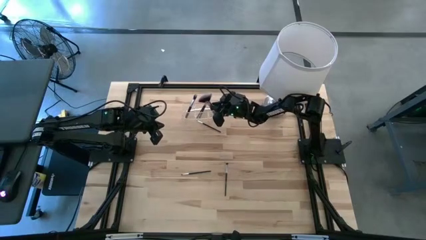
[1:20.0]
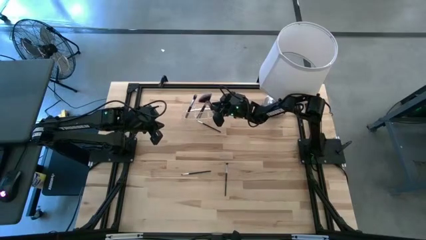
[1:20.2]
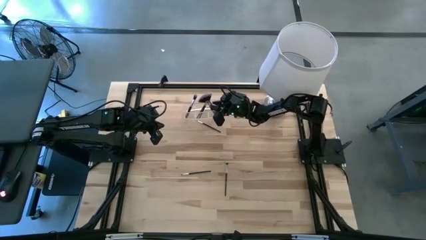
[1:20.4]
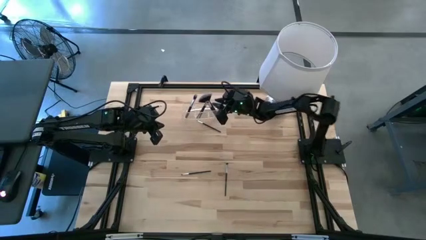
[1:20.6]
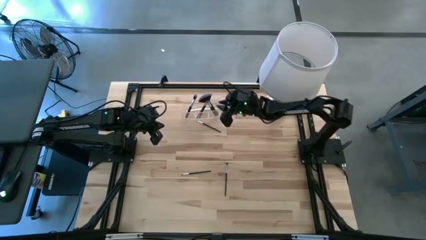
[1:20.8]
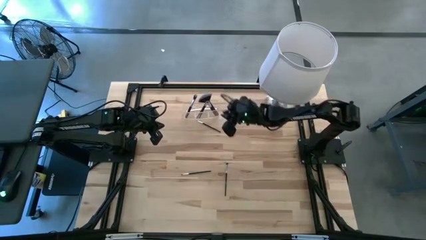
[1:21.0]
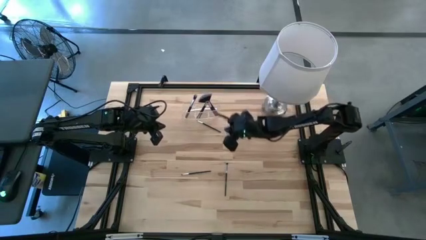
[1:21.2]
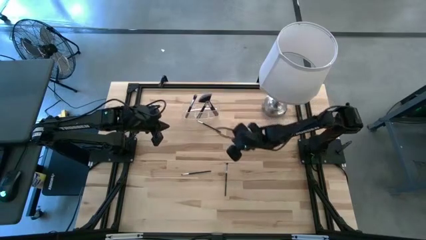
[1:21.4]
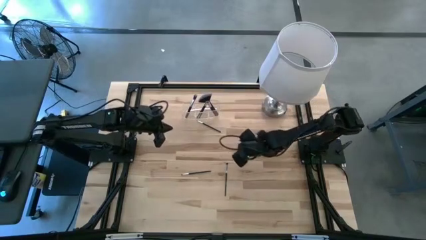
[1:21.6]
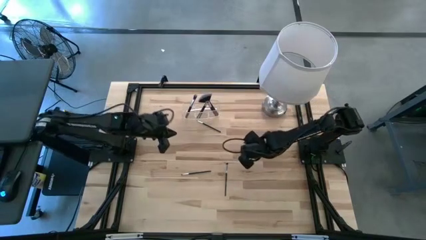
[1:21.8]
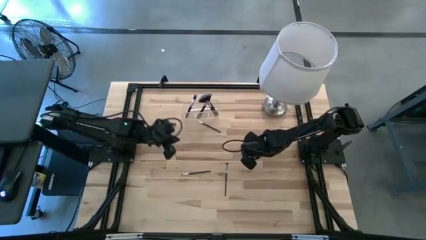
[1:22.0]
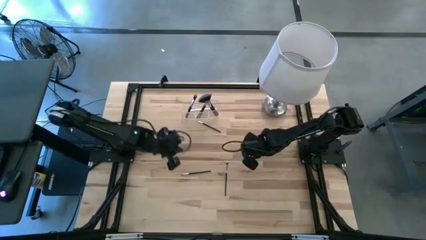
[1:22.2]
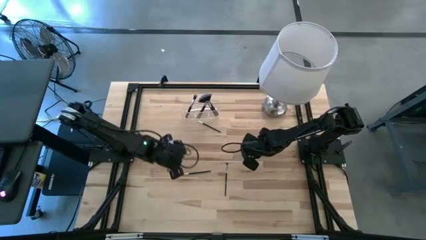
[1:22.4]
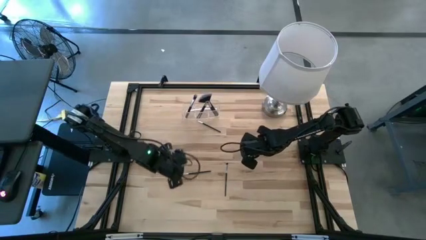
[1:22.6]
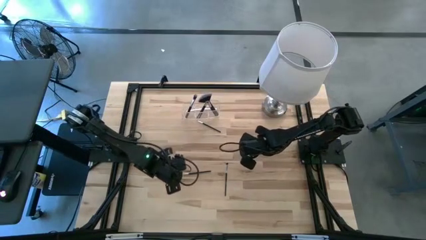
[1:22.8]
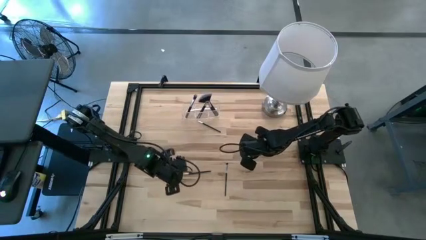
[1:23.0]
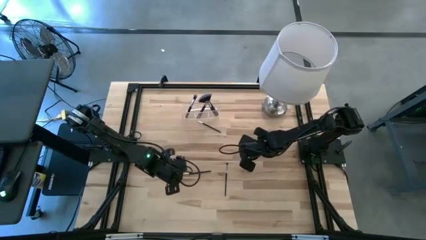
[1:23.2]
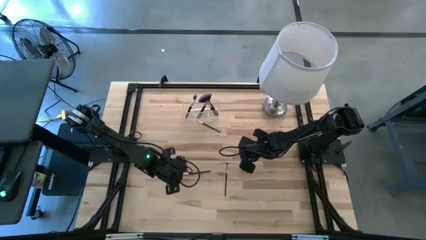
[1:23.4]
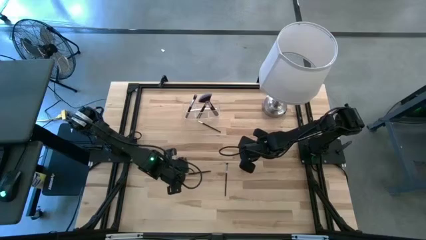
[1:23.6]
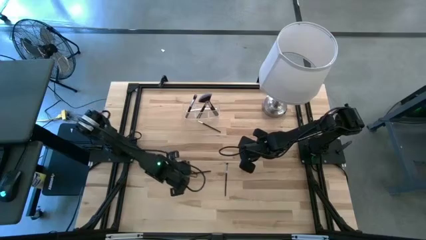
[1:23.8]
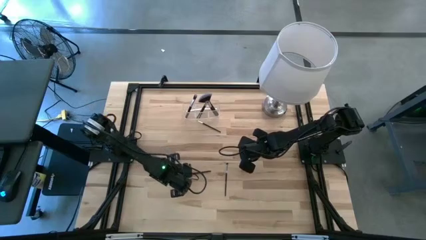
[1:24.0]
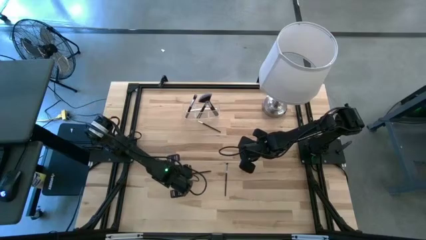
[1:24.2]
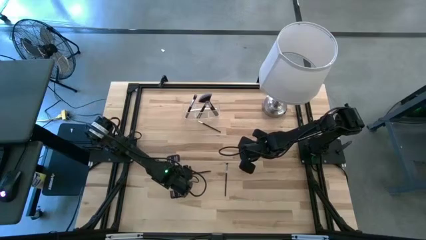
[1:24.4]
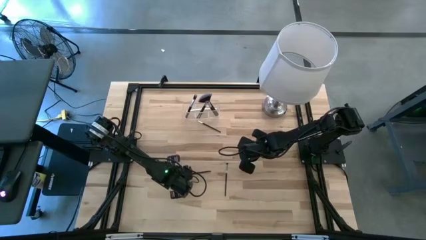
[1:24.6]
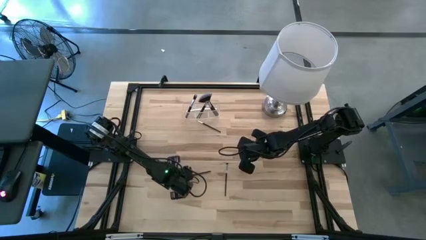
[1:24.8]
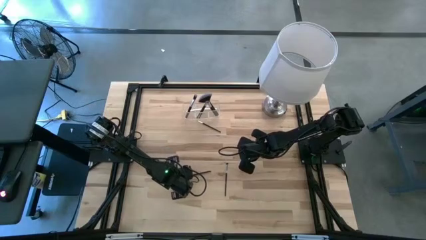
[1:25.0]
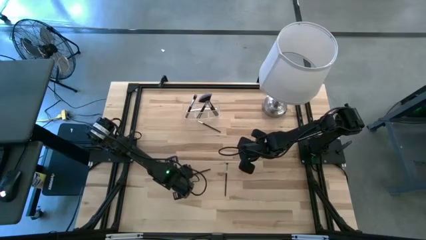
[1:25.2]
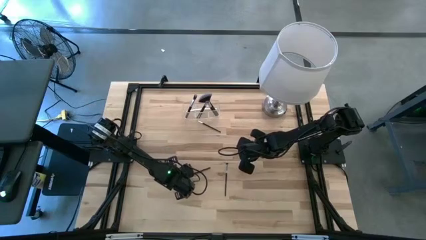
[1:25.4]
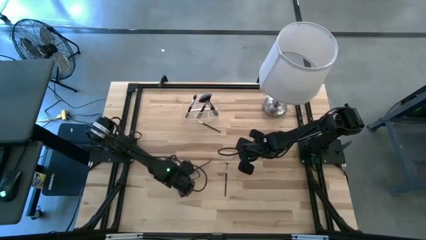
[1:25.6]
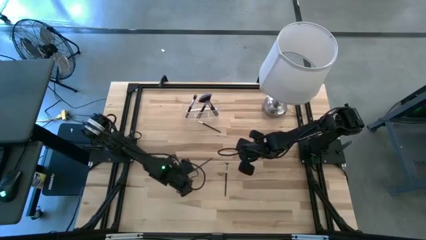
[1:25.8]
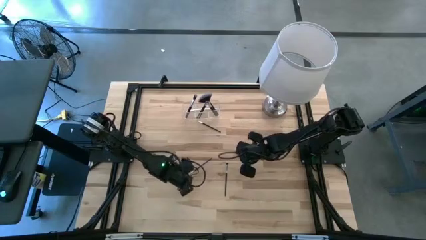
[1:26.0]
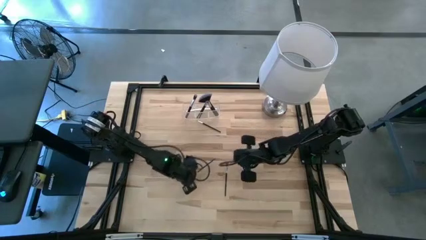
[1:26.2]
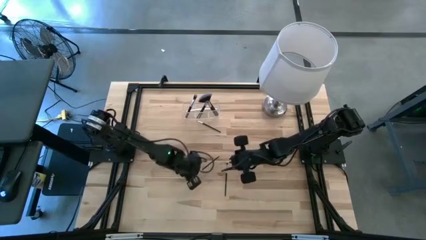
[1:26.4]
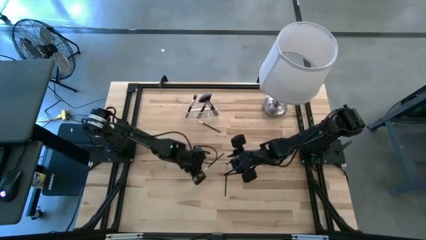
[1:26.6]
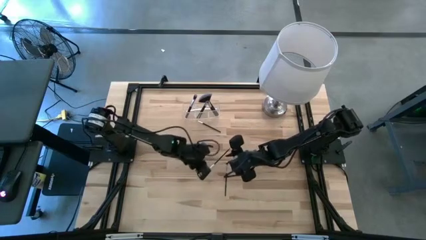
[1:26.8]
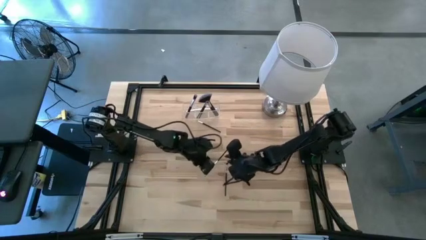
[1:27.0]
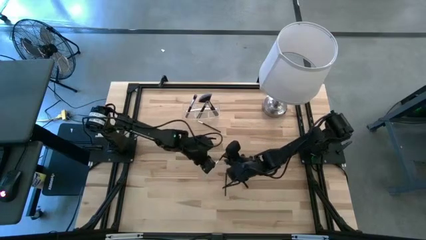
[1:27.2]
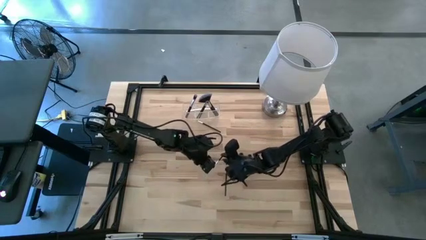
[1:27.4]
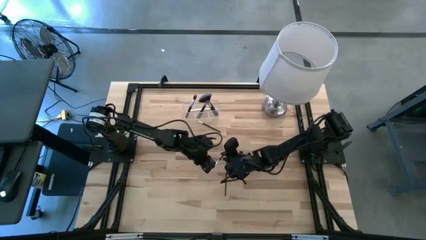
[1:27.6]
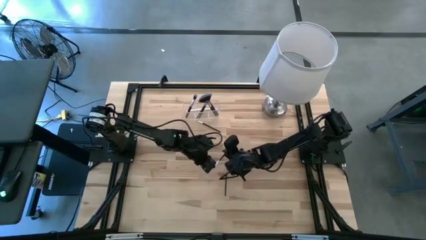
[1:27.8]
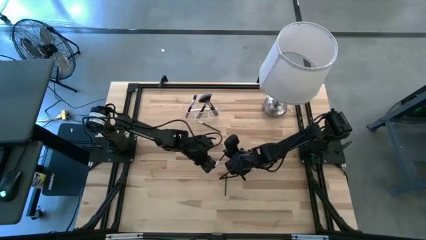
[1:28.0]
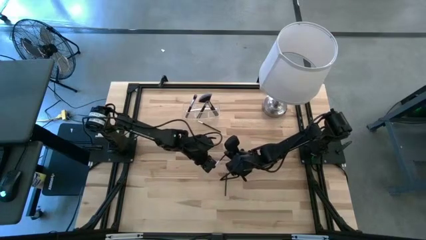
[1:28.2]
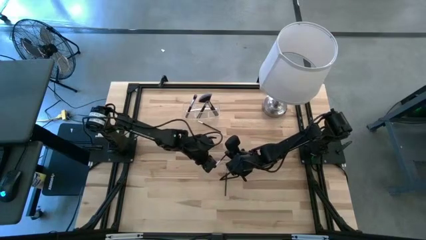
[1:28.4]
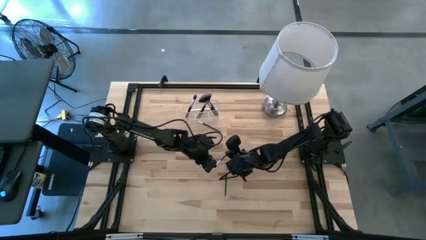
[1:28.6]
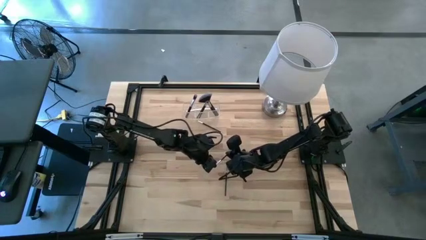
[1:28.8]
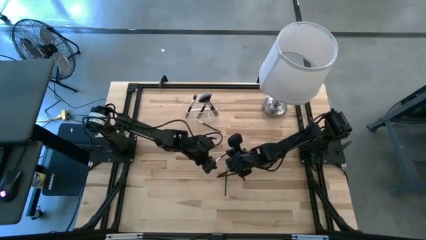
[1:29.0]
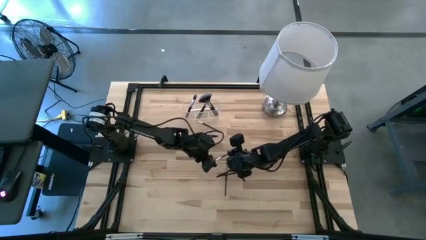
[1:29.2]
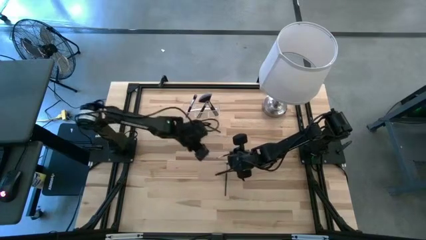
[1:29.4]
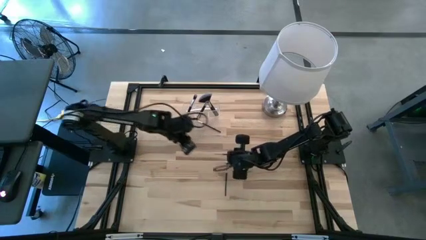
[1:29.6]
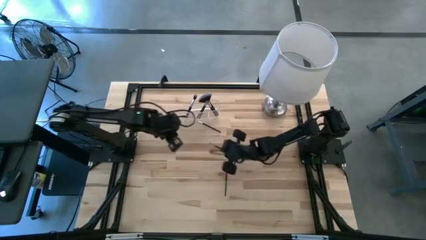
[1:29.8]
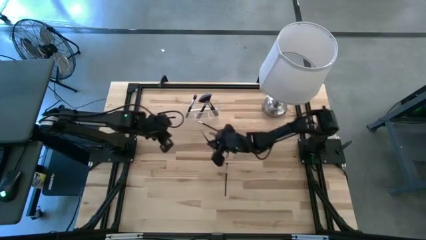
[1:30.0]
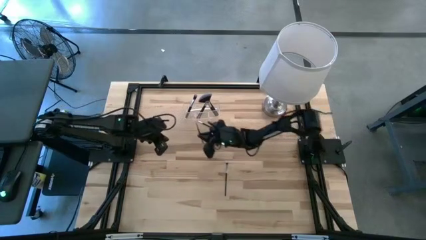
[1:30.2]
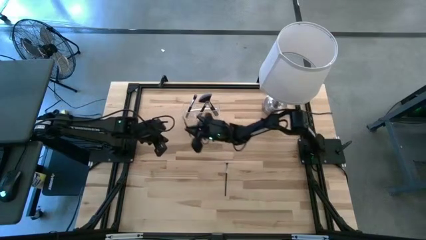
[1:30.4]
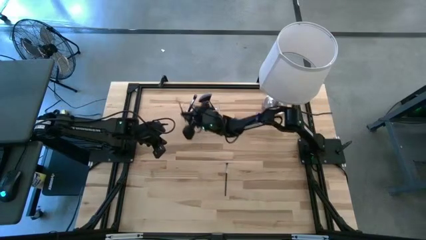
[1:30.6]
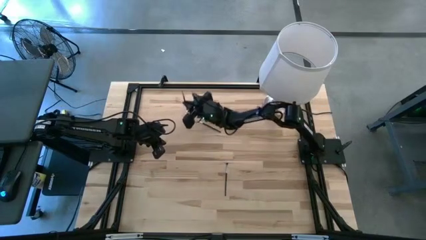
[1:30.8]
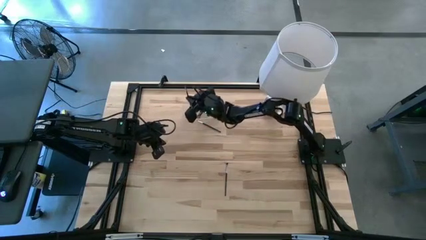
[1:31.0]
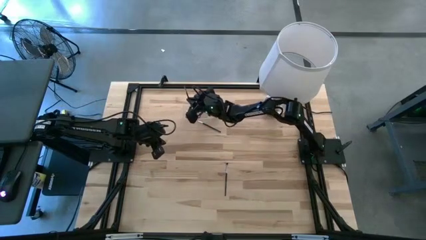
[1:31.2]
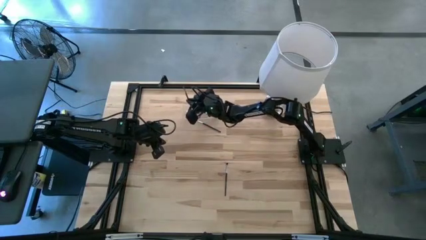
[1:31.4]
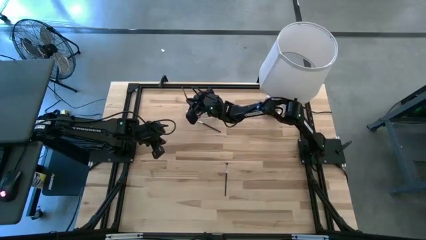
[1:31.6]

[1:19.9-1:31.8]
Task: Put items in baskets/containers
Put the foundation brush into the transparent organizer

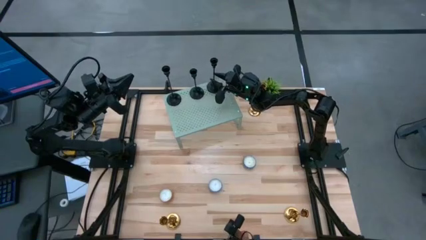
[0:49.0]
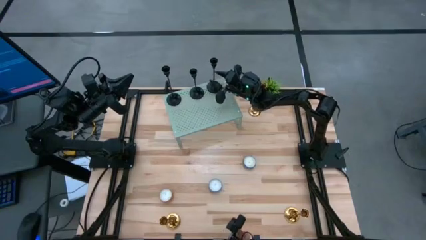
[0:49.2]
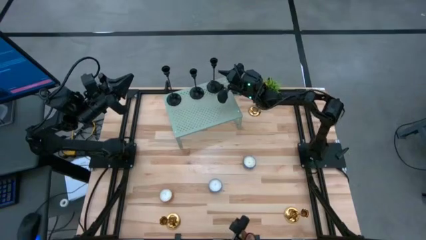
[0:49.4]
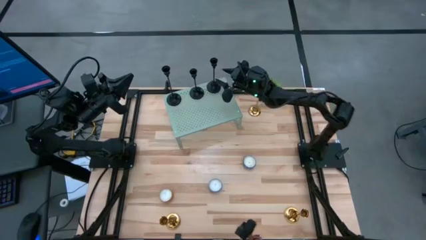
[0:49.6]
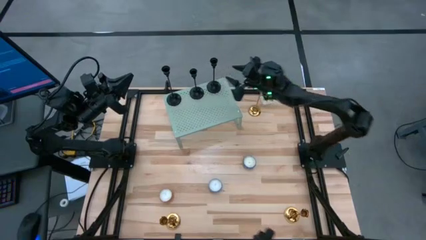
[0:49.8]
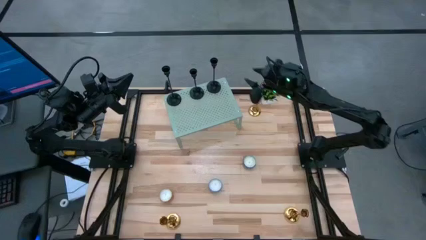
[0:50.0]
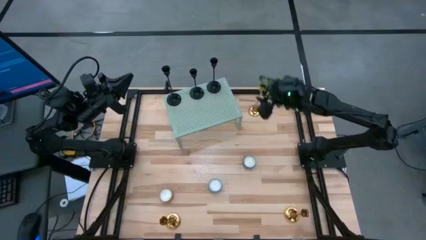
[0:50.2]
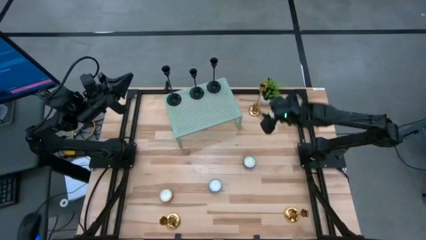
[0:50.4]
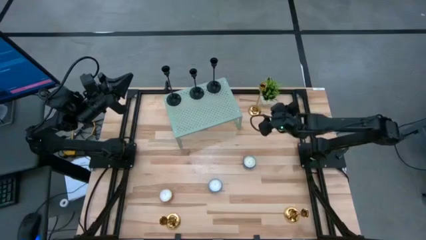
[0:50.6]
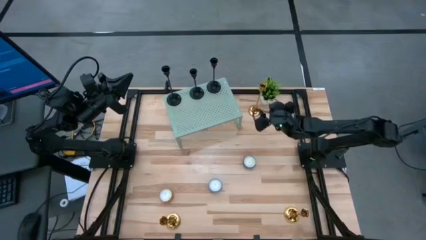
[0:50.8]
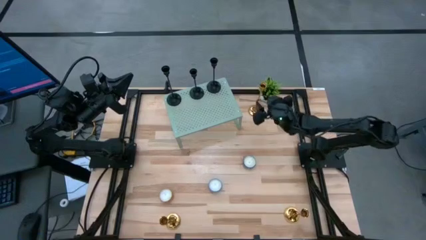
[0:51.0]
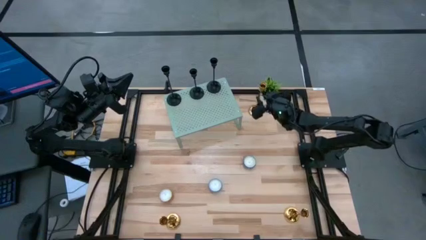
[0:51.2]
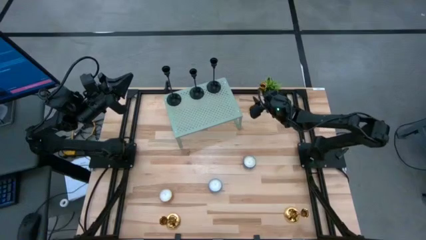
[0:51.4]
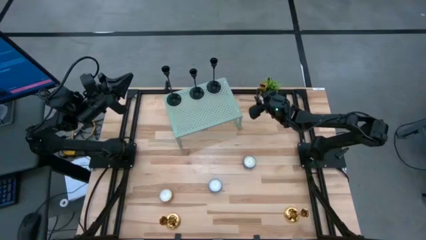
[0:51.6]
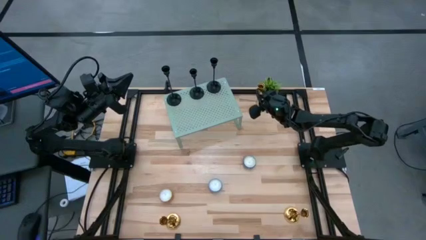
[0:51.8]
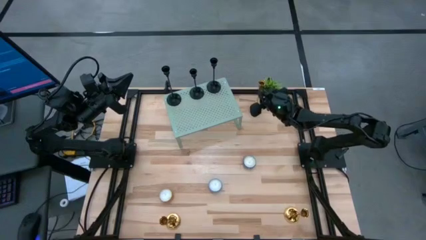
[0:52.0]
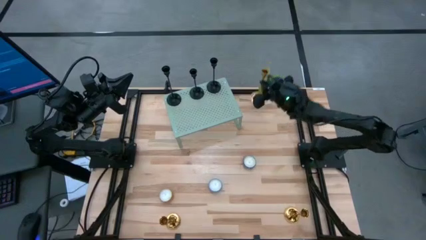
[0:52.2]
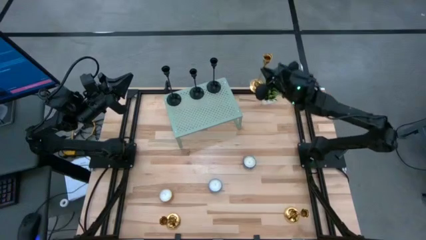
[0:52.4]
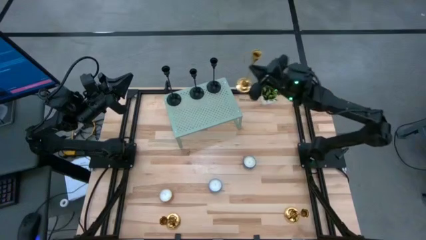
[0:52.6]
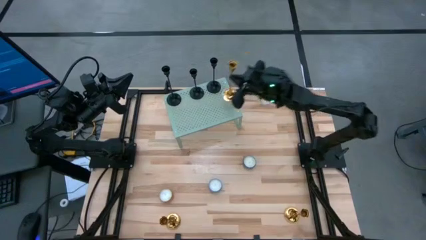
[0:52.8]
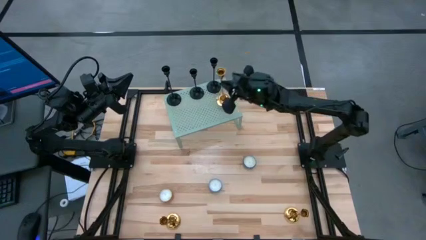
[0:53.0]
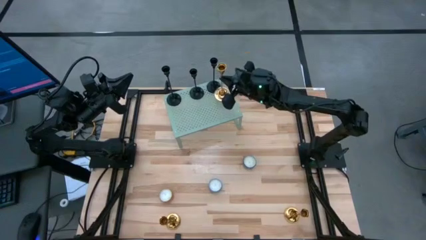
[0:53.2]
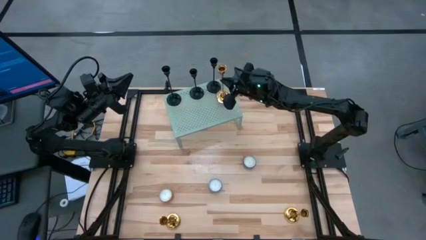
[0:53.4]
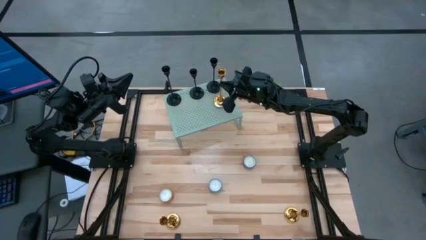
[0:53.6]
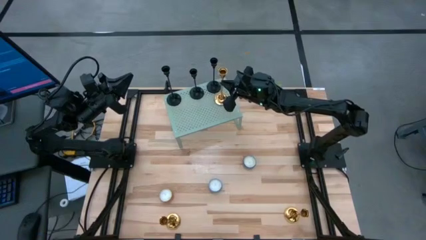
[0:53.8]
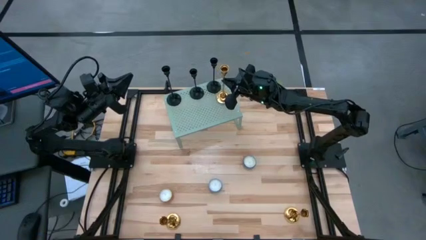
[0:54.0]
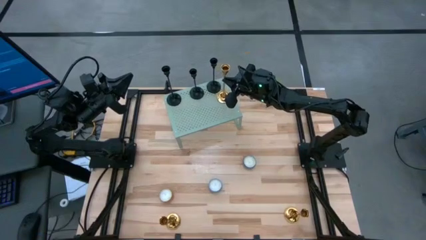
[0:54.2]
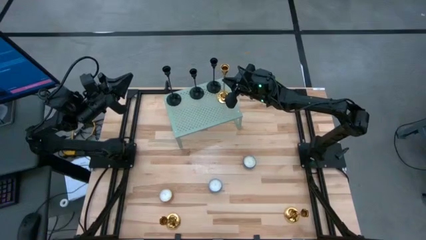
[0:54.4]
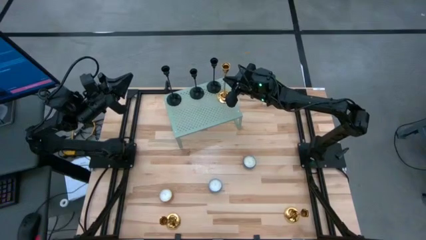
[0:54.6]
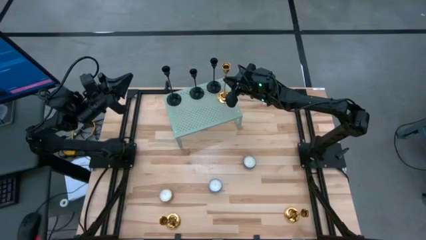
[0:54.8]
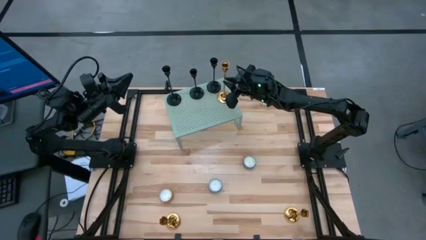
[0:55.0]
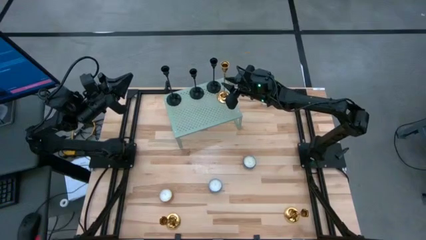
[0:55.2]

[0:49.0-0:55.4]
Task: Pick & Place candle stick holders
Put the top gold candle holder on the shelf
